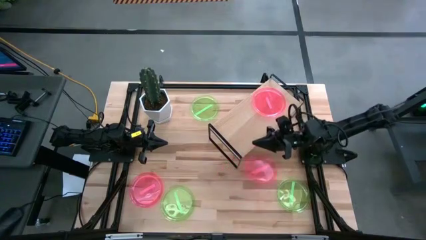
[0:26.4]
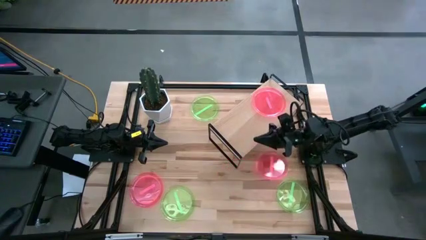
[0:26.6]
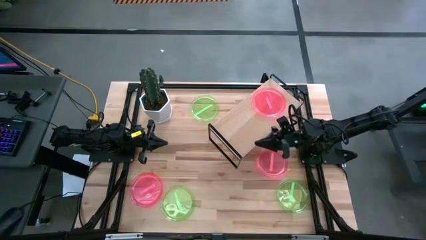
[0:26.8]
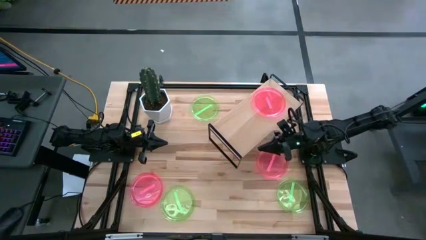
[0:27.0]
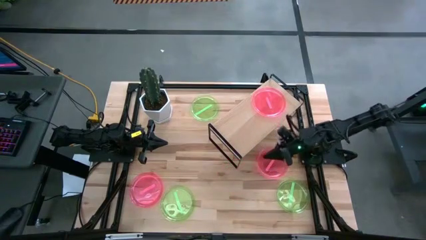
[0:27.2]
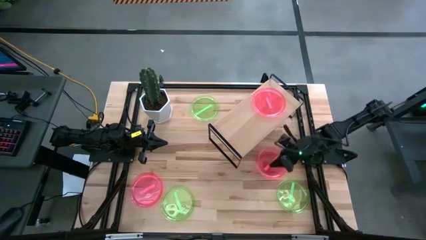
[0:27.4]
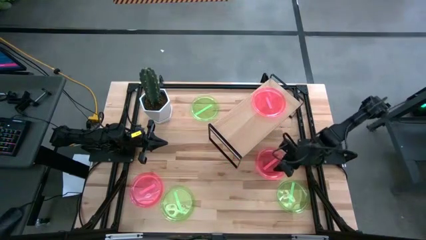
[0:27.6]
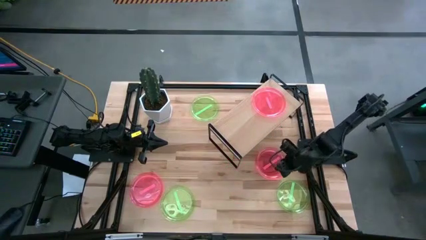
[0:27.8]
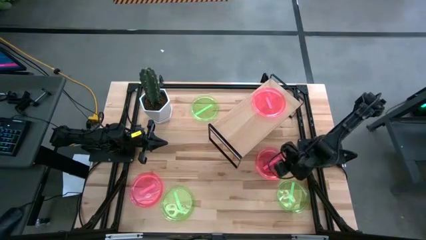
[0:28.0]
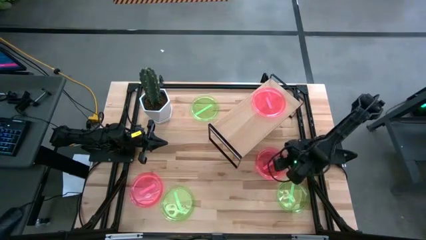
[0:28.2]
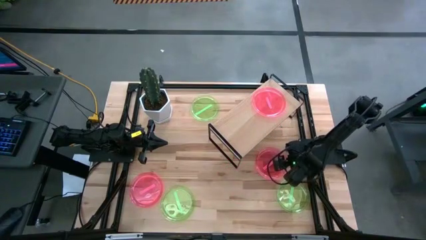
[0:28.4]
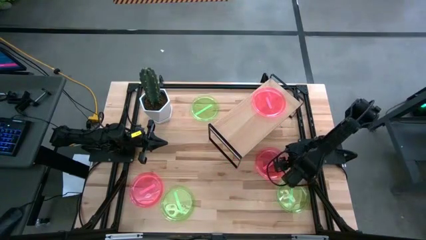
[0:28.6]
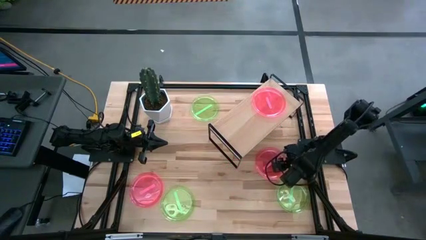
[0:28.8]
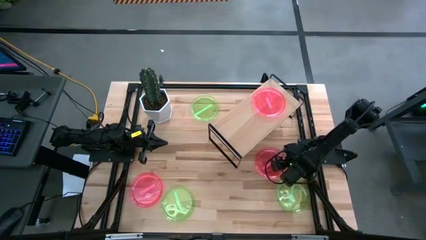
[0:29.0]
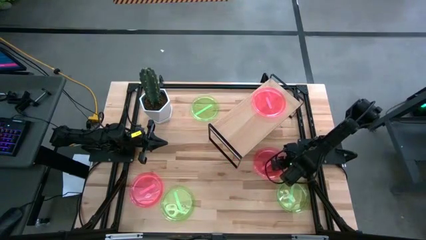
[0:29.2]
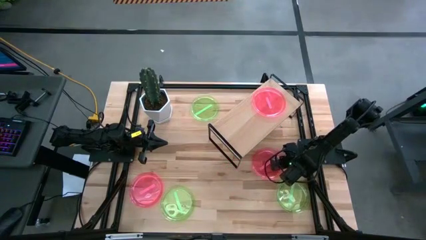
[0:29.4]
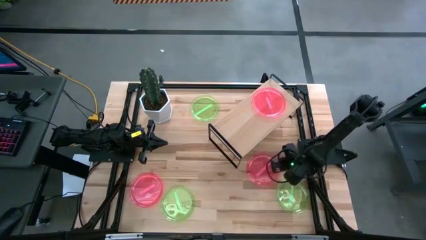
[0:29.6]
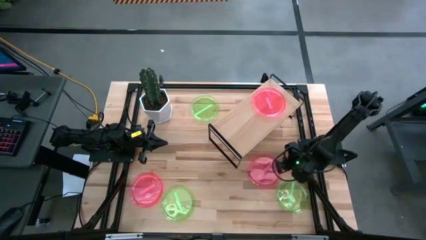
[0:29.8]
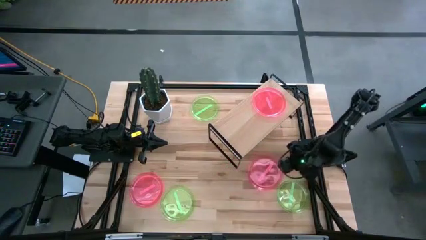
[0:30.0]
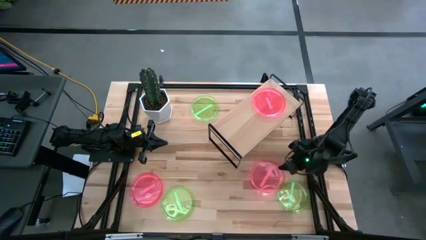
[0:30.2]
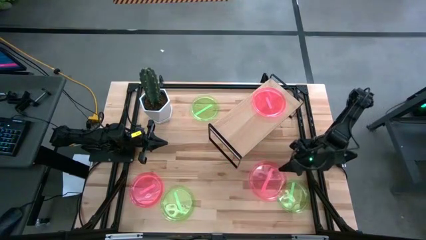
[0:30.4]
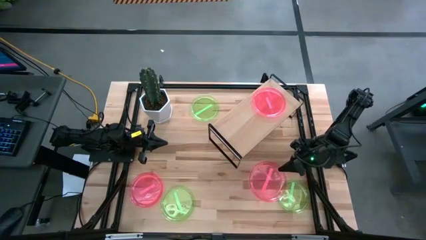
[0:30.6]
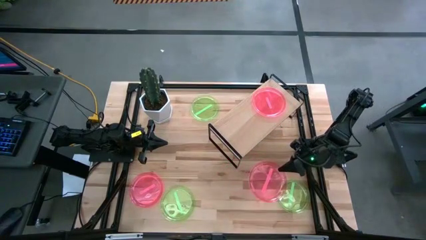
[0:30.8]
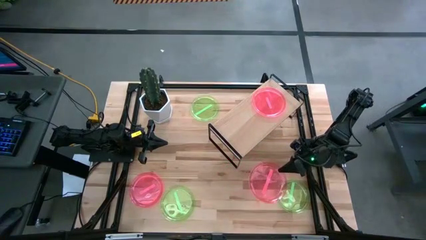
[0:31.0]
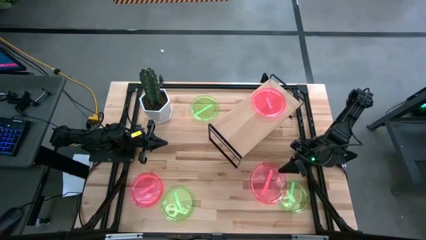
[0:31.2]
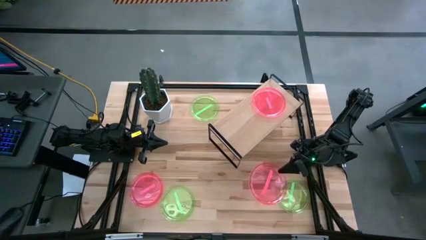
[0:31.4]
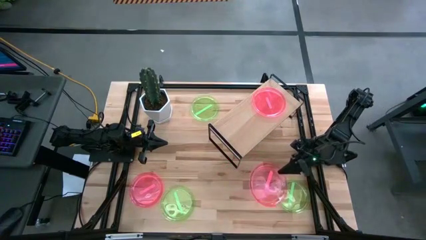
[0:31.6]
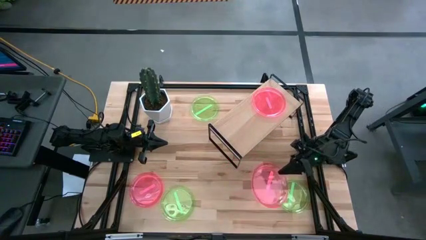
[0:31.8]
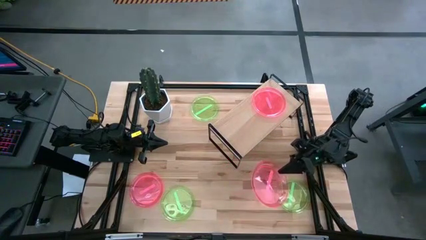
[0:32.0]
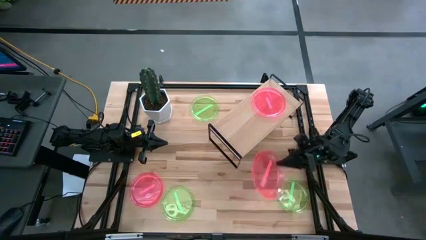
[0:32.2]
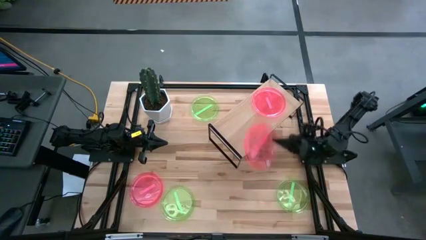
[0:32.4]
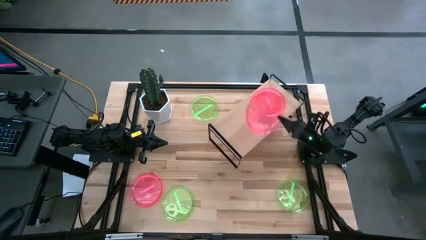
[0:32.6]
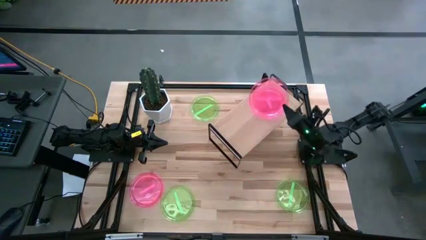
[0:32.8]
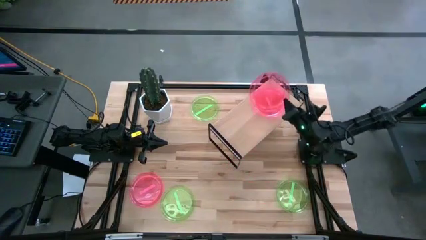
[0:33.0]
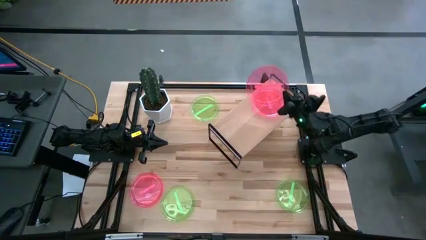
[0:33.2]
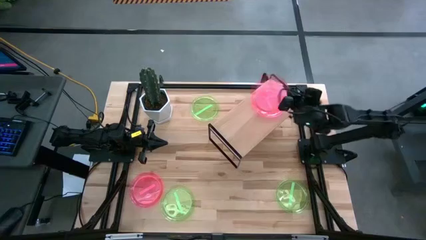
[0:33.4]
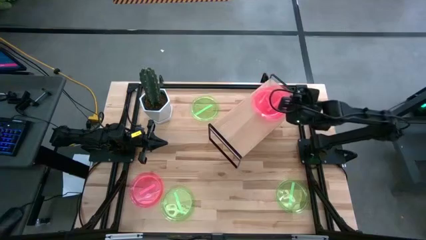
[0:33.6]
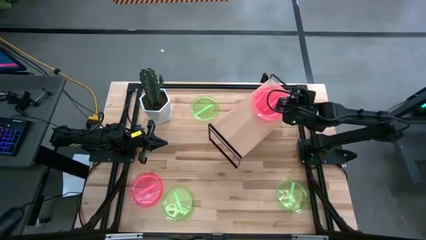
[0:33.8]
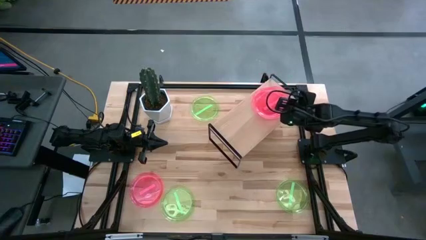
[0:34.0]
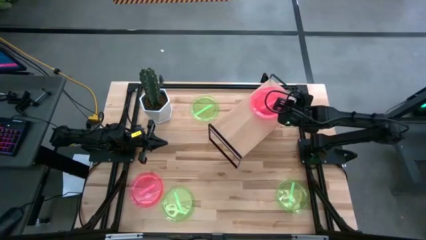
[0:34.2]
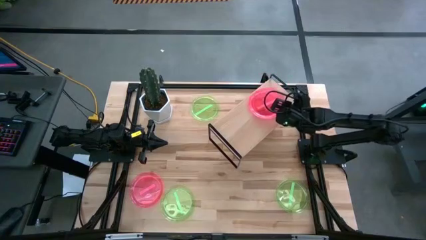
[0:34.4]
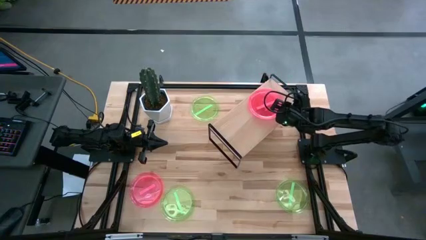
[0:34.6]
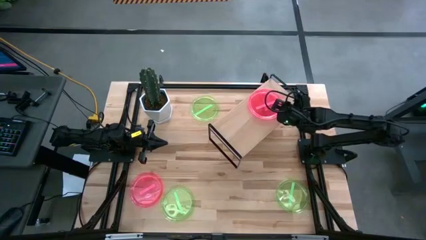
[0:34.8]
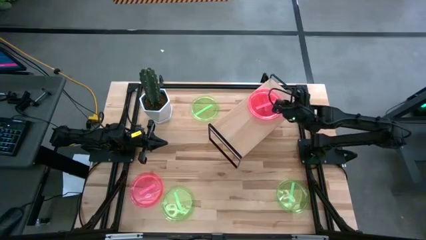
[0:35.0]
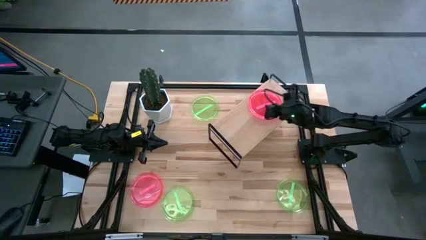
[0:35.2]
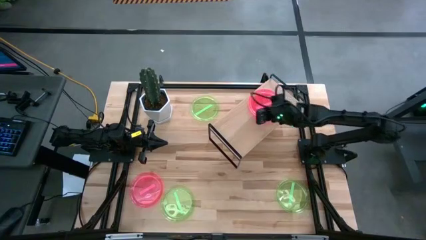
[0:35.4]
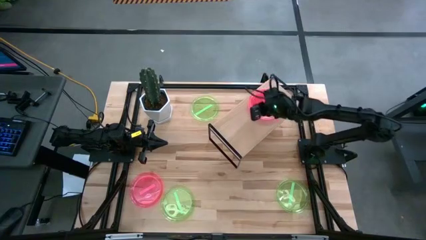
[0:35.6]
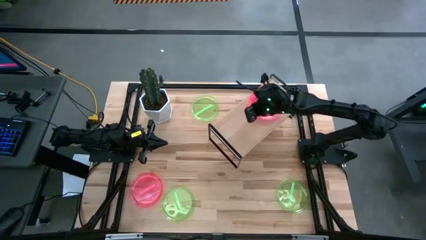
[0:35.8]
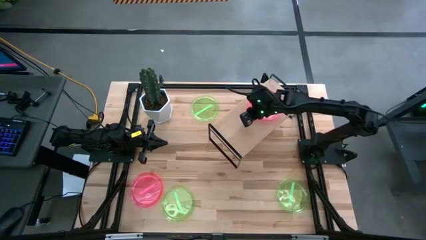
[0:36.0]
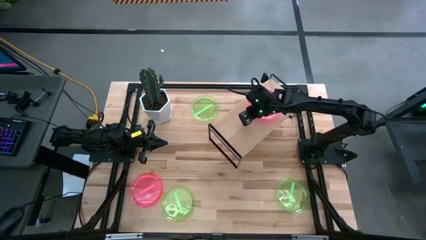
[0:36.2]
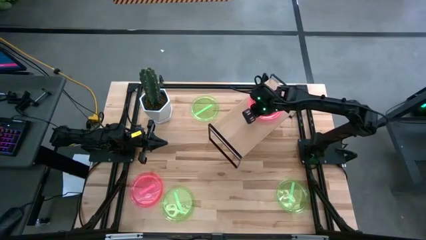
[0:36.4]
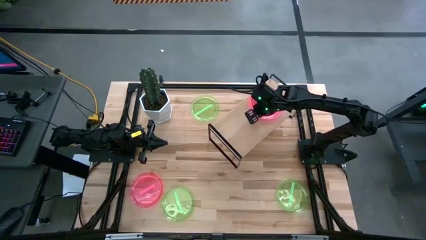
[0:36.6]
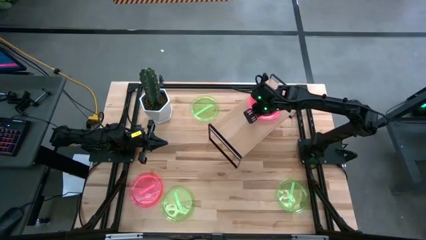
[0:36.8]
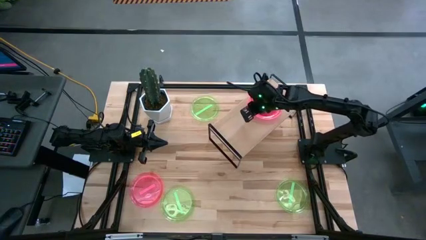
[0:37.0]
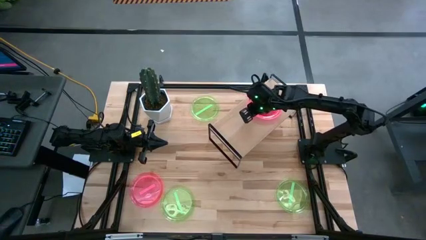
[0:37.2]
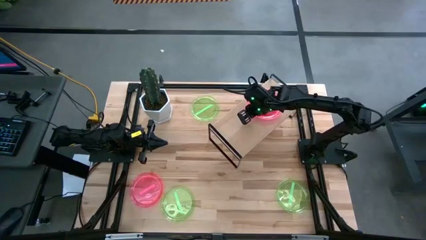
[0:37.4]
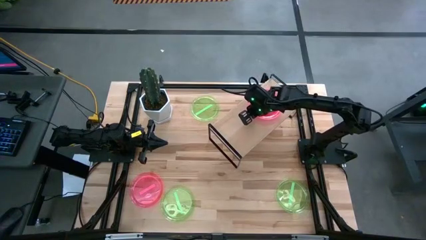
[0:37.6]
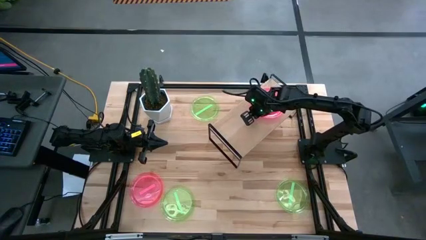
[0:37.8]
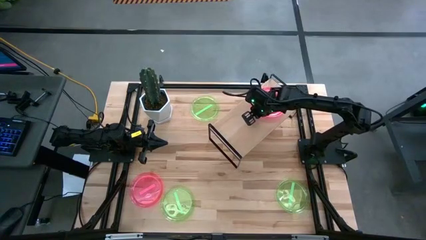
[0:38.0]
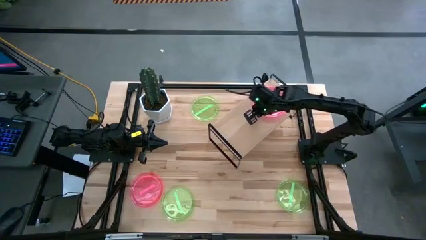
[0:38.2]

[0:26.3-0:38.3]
Task: Place and stack plates onto a shelf
Stack the top pink plate on the top of the pink plate

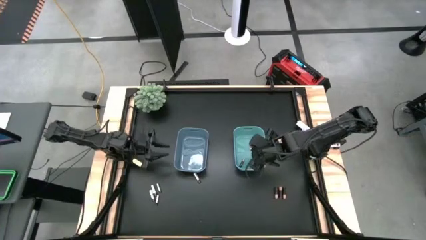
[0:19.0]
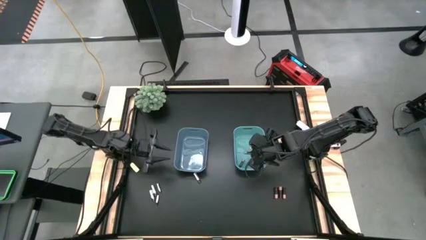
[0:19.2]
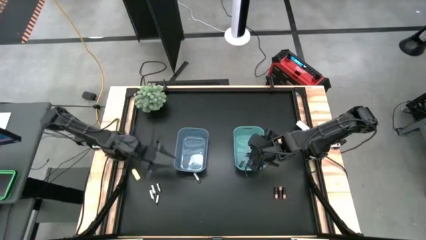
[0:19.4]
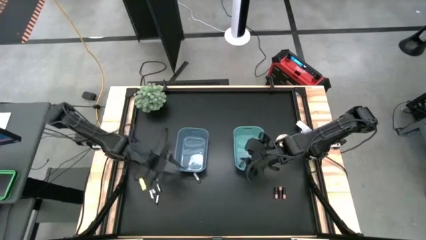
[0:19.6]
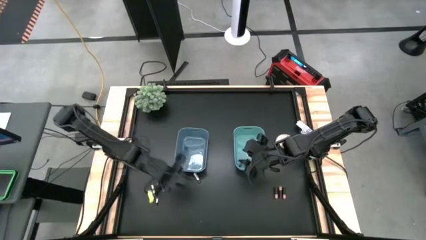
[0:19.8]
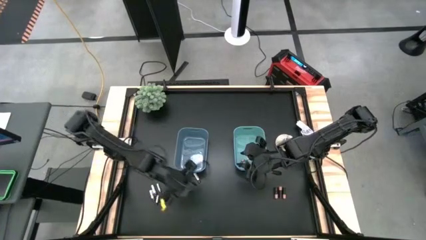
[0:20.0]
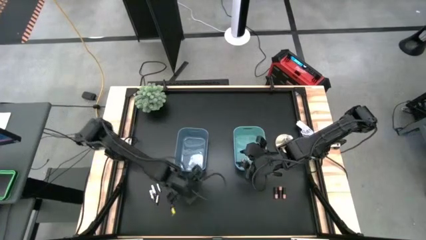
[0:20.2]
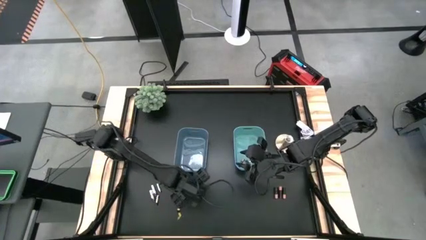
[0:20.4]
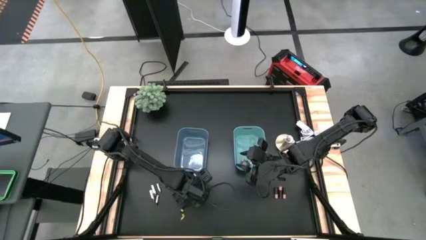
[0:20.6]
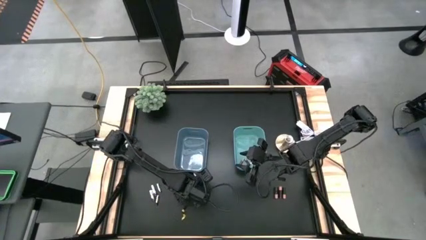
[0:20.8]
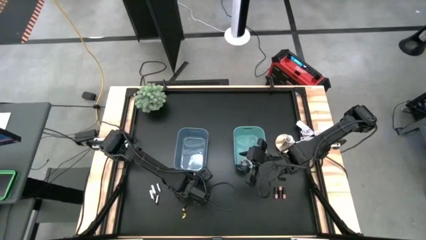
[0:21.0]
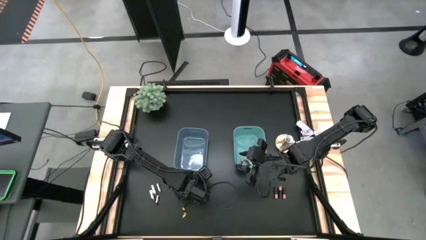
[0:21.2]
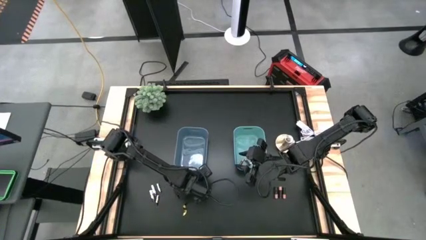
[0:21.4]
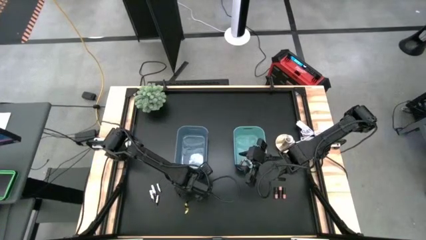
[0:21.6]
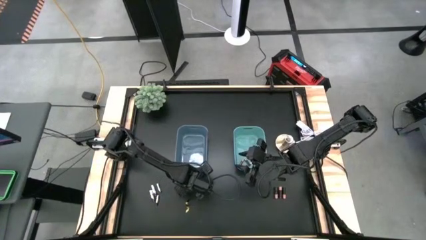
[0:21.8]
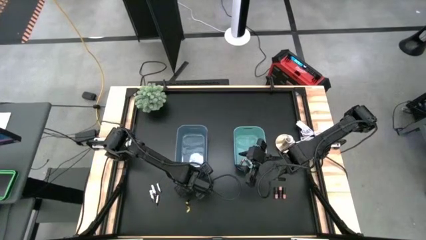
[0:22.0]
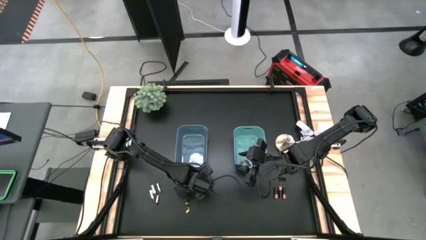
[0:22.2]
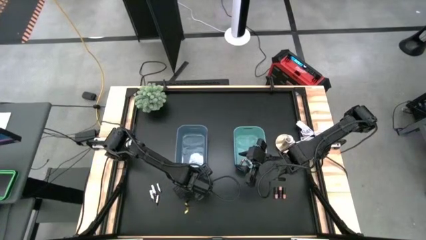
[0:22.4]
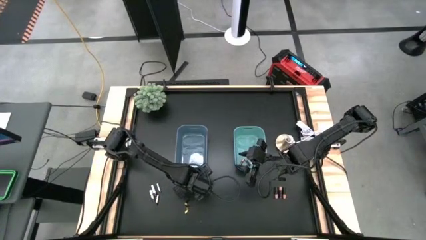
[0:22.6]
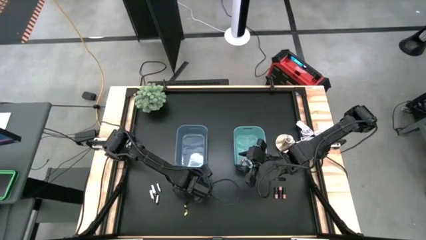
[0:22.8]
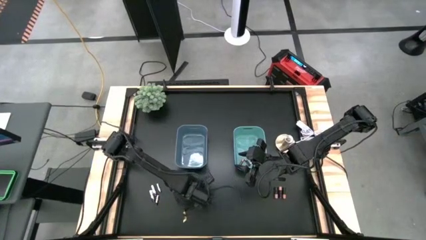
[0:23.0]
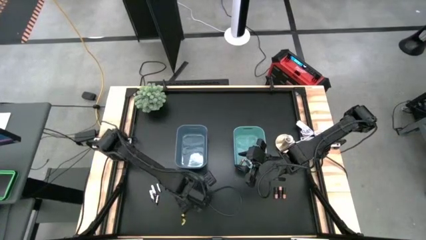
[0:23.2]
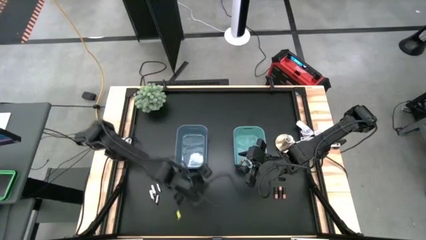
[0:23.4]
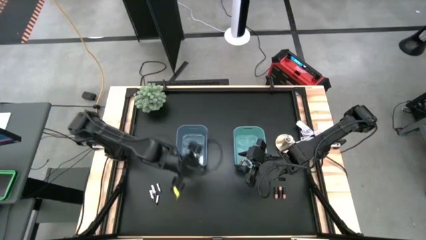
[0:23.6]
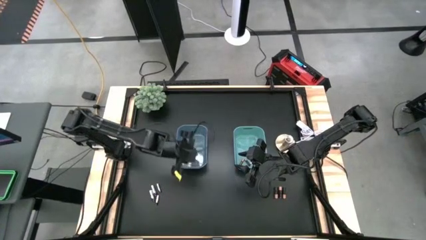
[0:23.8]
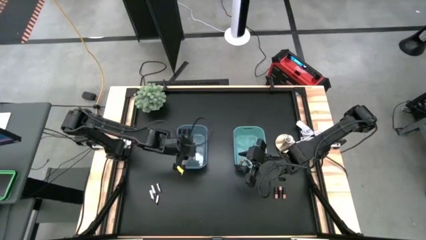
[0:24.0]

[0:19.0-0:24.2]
Task: Sort batteries
Put the big silver battery into the blue bin
